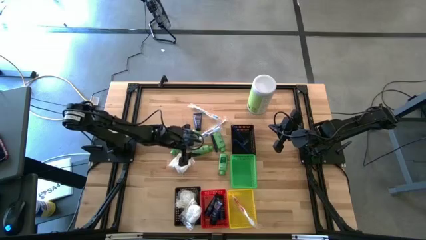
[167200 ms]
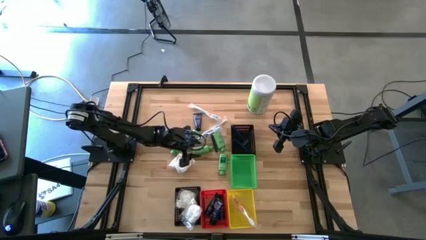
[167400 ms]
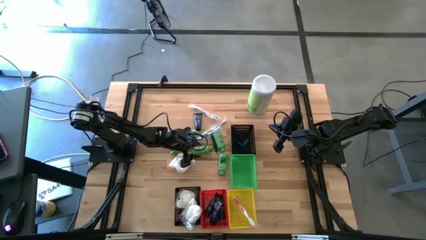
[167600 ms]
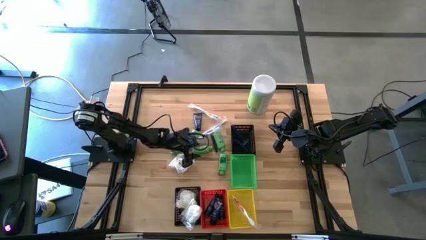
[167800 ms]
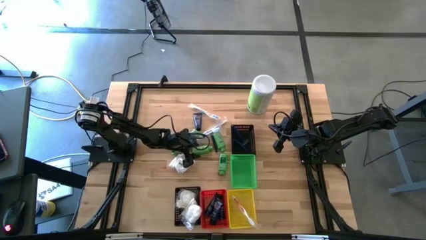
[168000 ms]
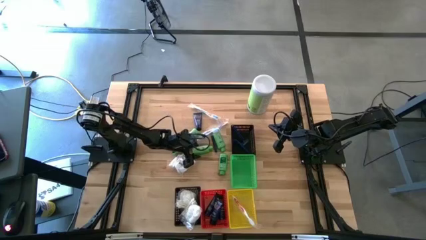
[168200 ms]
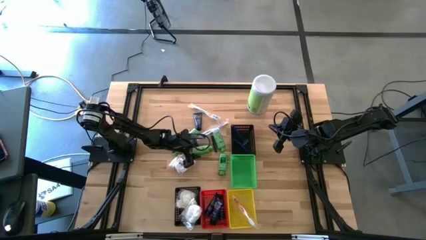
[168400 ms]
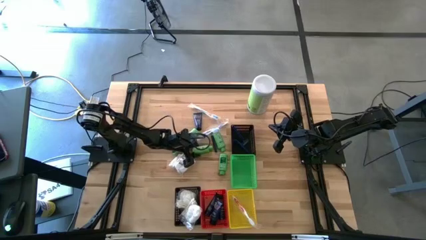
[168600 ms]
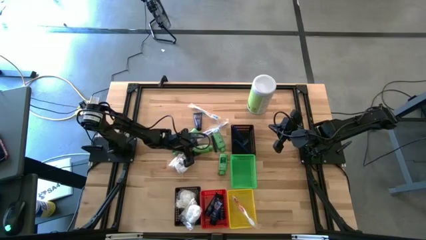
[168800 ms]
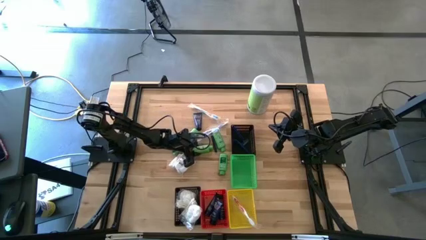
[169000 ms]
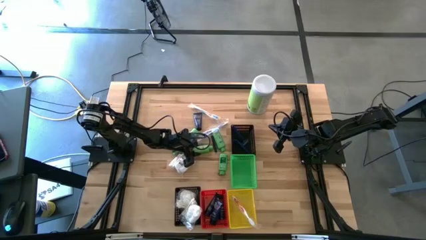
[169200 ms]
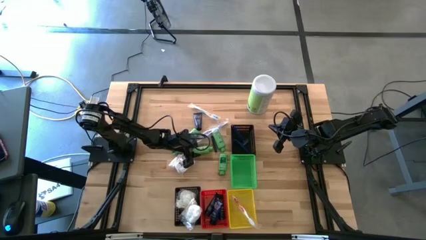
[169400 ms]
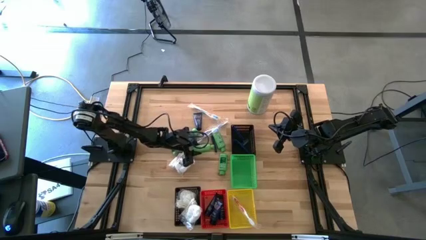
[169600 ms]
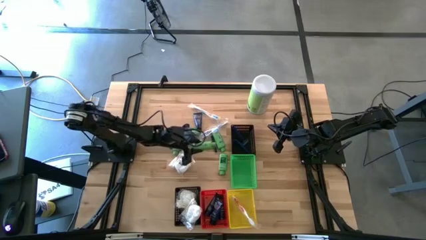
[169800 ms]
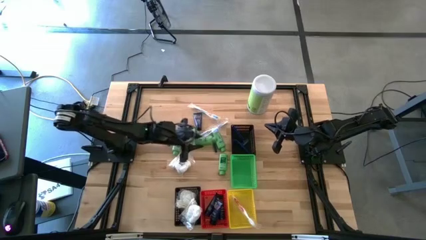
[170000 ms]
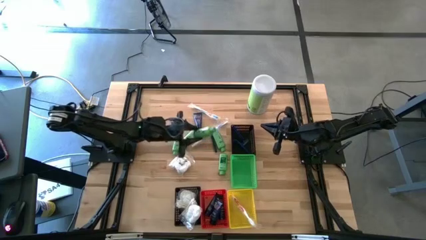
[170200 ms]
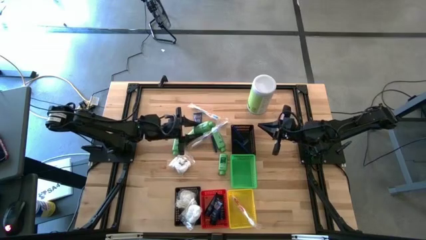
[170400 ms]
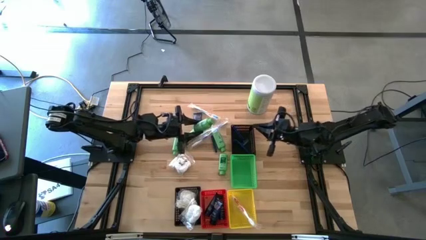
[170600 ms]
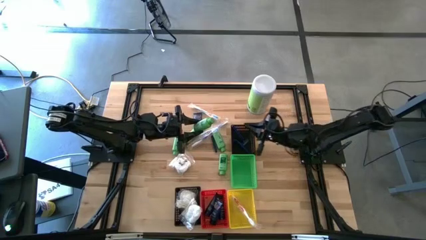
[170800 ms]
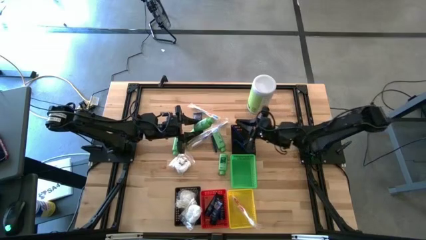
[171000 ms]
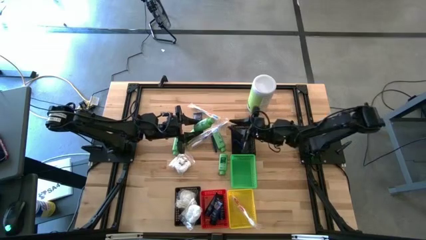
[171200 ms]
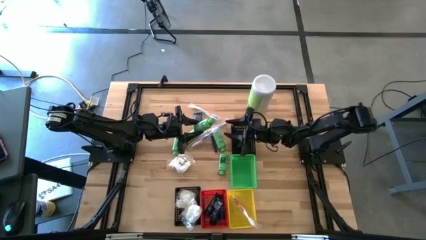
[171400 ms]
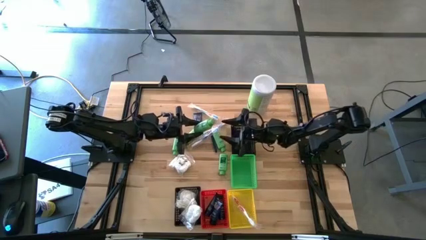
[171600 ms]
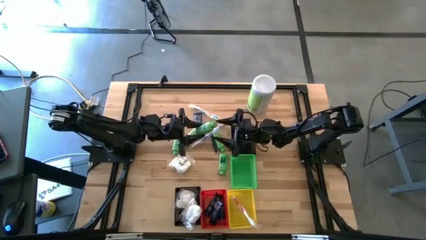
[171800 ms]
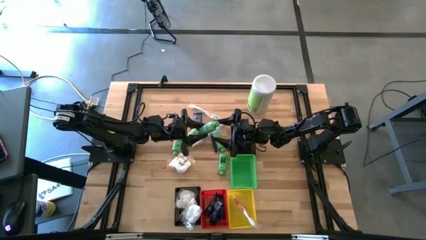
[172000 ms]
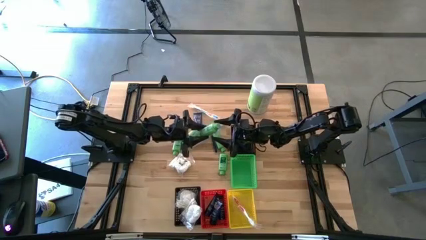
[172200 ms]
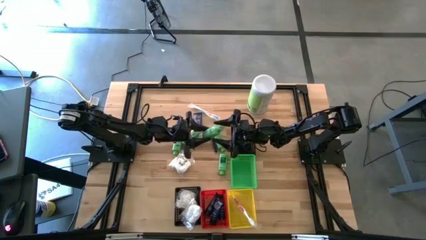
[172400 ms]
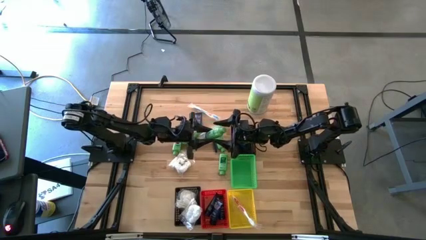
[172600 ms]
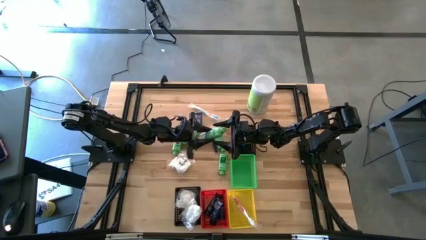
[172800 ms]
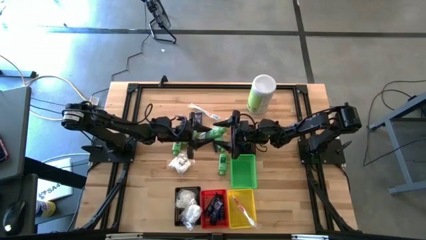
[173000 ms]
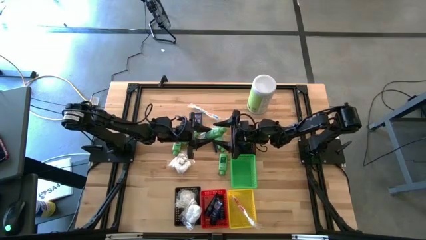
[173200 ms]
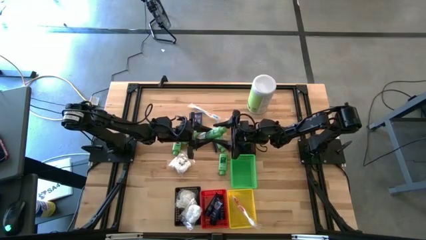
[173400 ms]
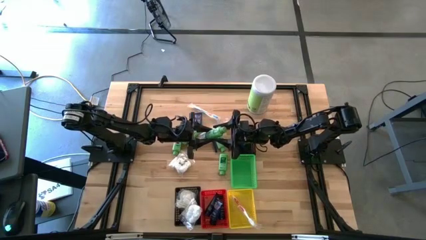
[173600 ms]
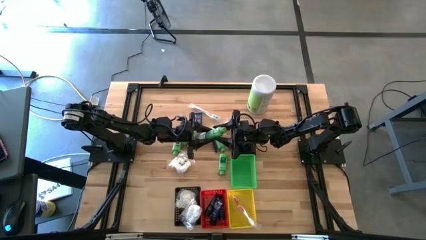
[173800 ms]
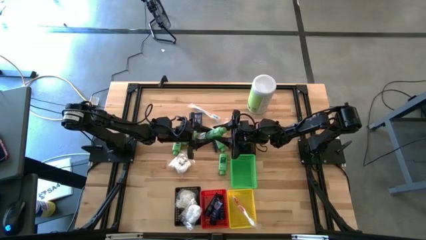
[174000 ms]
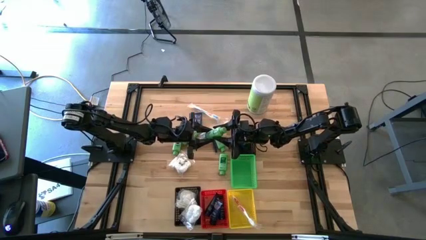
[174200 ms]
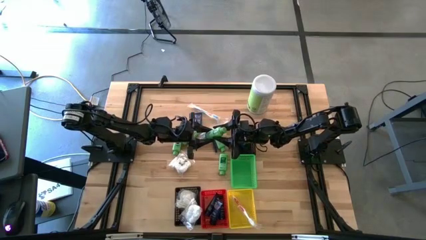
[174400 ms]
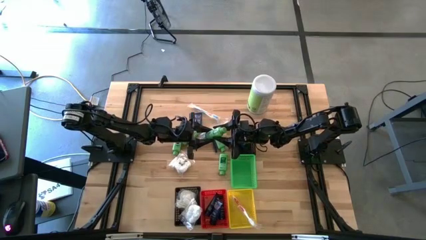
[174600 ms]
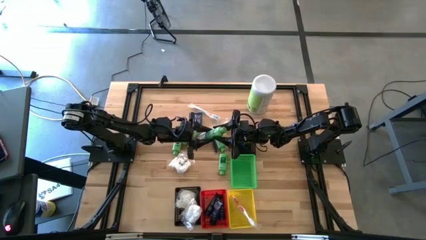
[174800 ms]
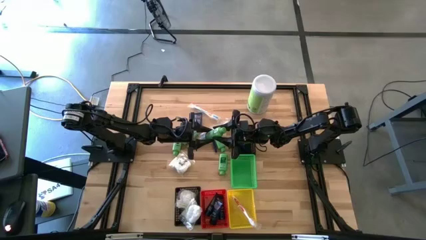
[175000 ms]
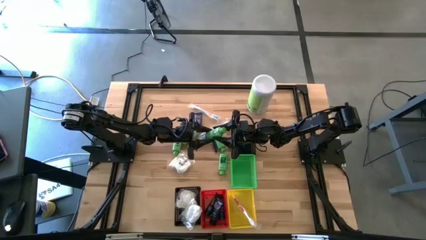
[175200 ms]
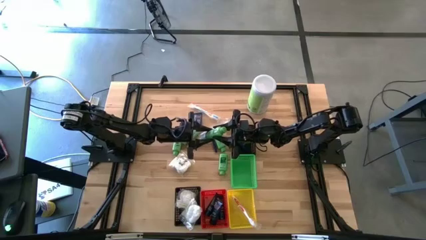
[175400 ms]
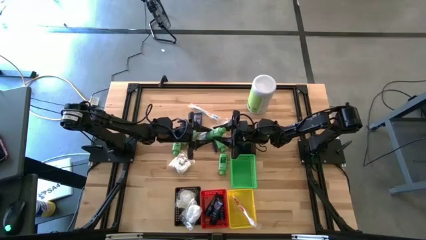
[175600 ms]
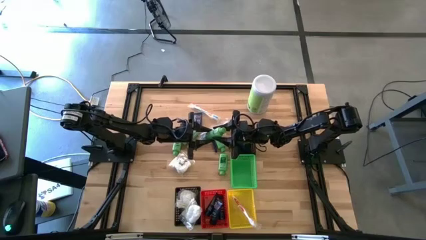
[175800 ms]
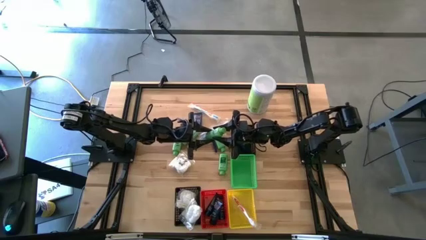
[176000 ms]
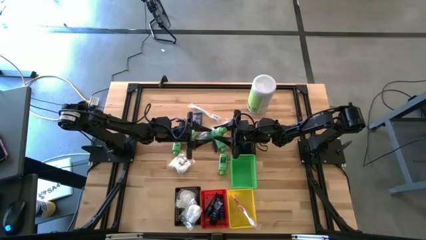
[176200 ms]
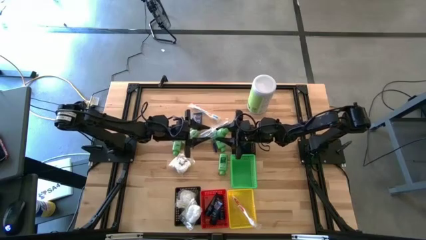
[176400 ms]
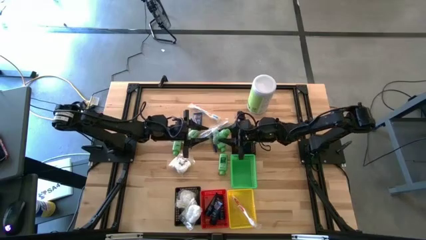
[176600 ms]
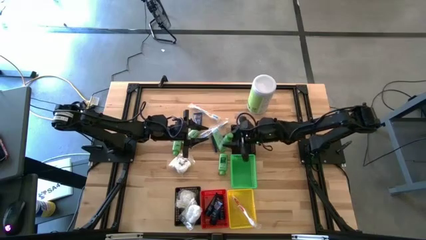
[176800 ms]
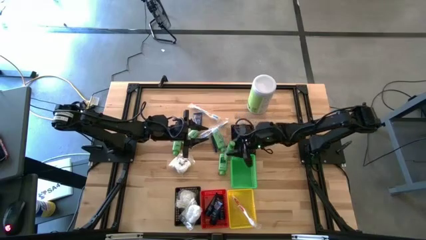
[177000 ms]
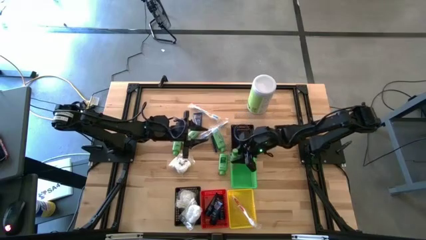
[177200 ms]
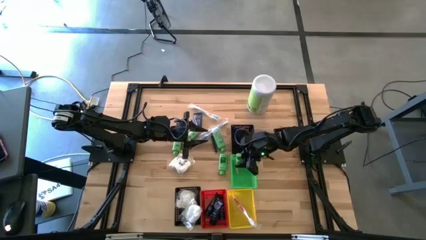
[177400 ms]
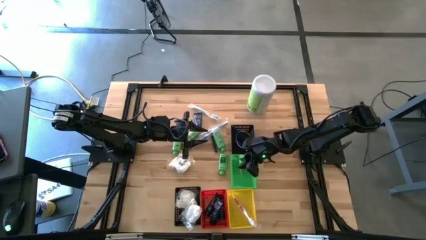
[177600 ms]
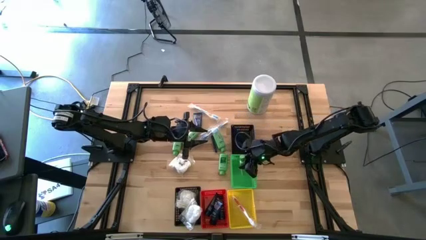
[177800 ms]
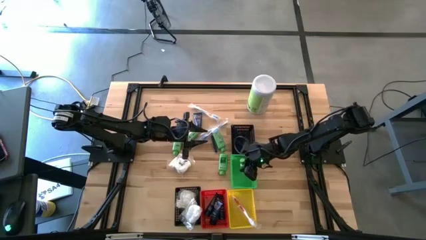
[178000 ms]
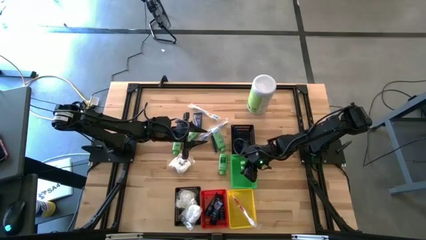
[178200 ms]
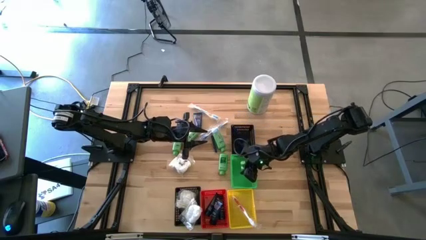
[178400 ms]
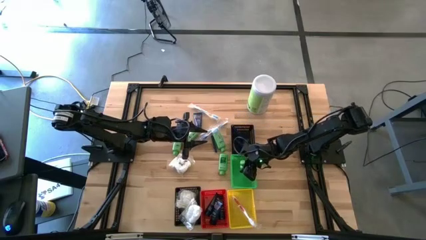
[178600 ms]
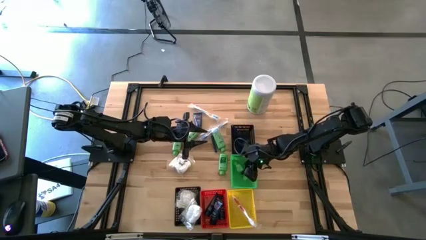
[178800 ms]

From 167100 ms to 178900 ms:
Task: Pick & Place Travel size toiletries
Put the green shampoo into the green bin

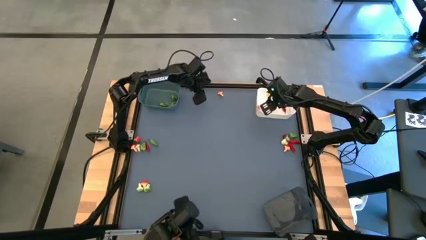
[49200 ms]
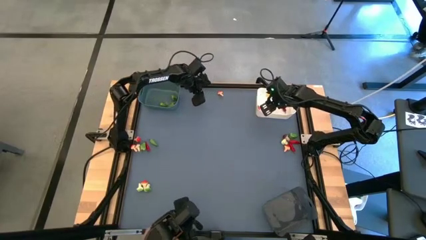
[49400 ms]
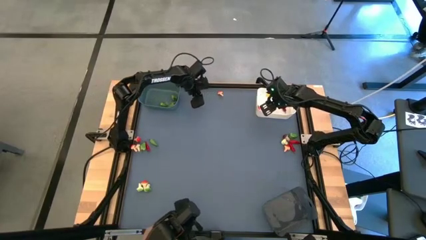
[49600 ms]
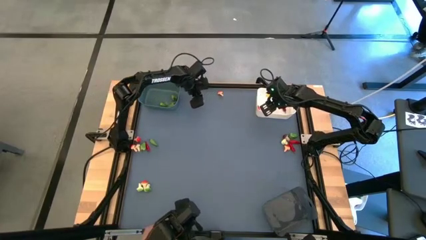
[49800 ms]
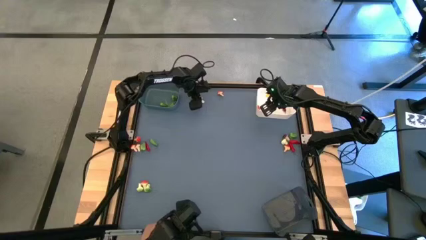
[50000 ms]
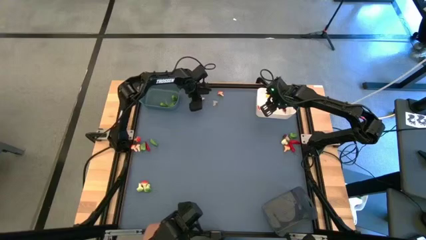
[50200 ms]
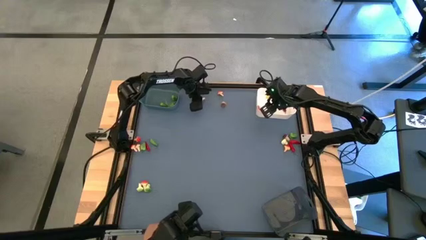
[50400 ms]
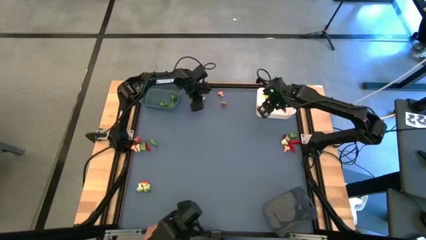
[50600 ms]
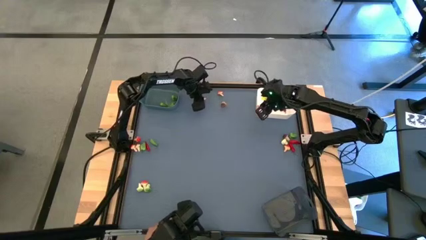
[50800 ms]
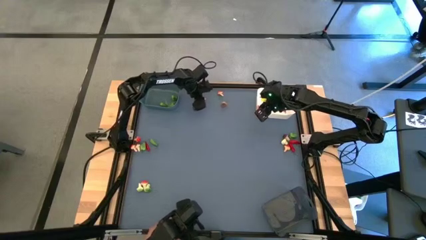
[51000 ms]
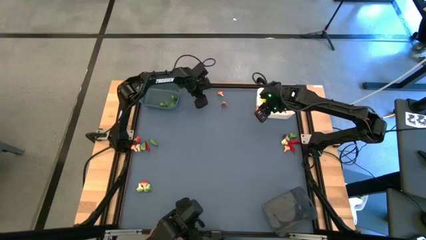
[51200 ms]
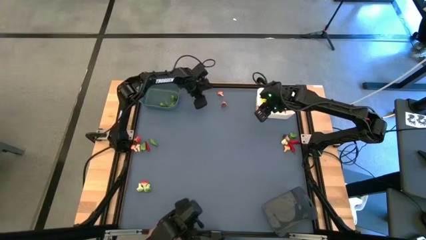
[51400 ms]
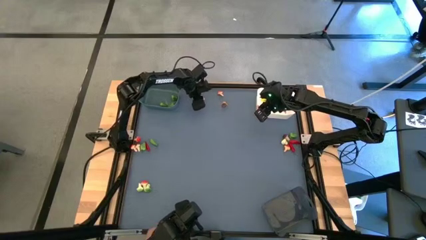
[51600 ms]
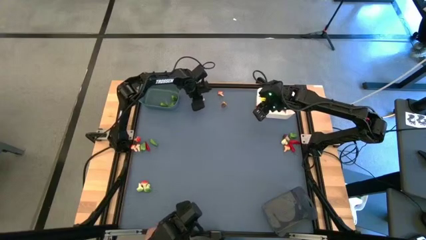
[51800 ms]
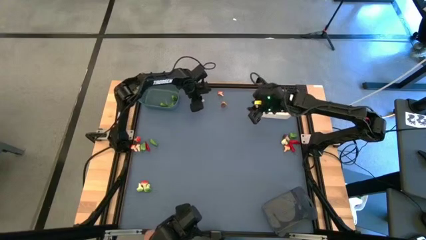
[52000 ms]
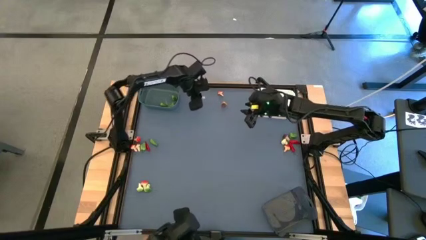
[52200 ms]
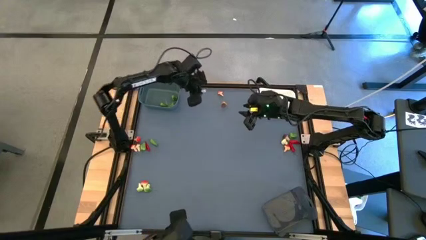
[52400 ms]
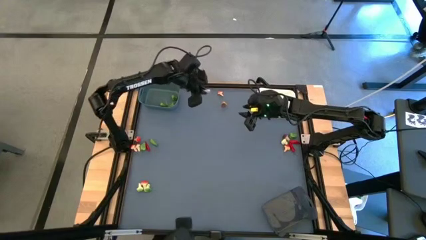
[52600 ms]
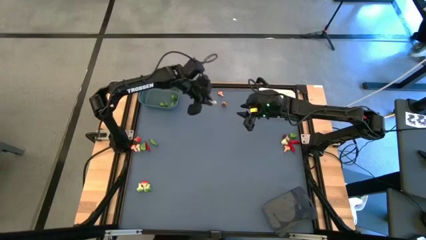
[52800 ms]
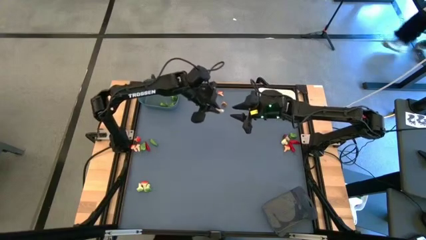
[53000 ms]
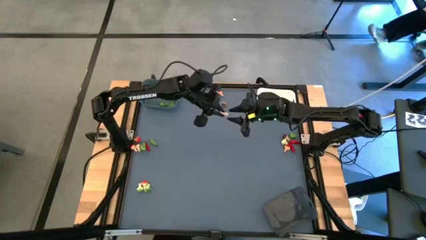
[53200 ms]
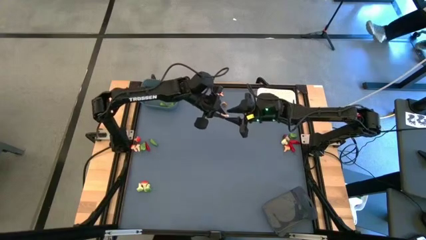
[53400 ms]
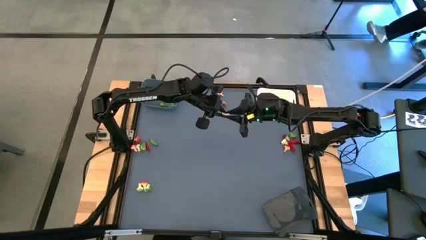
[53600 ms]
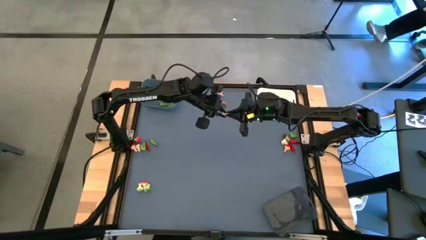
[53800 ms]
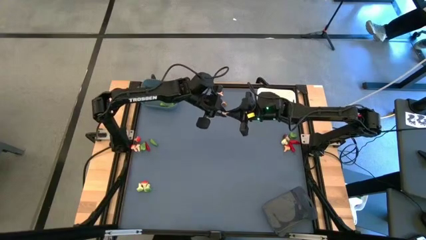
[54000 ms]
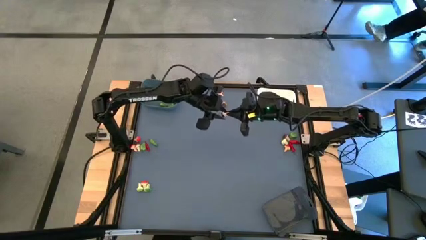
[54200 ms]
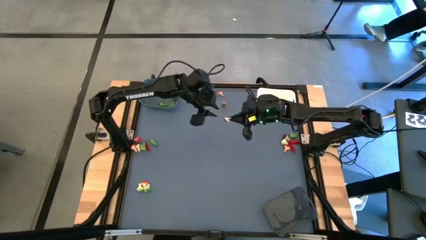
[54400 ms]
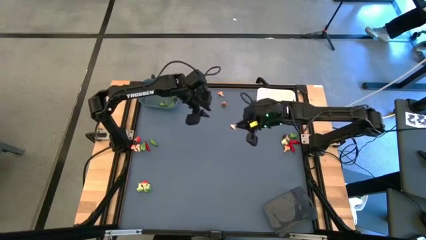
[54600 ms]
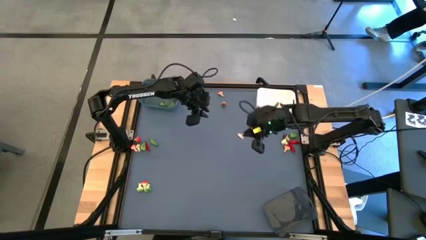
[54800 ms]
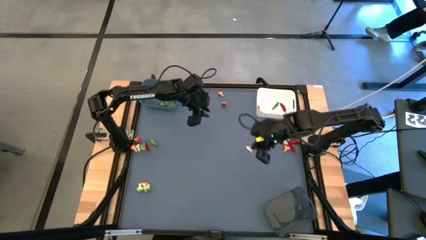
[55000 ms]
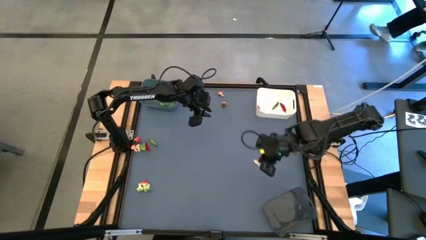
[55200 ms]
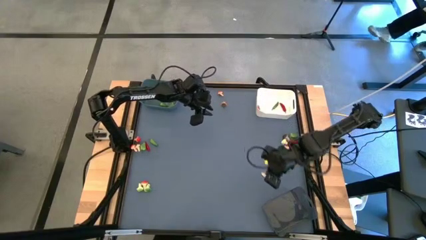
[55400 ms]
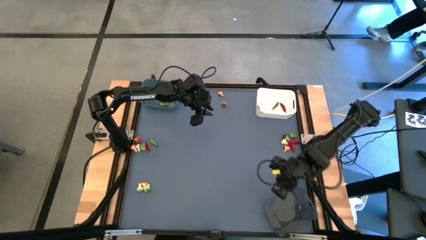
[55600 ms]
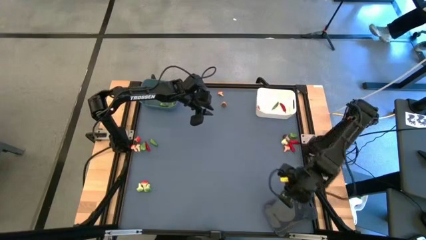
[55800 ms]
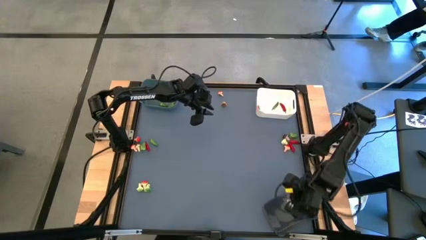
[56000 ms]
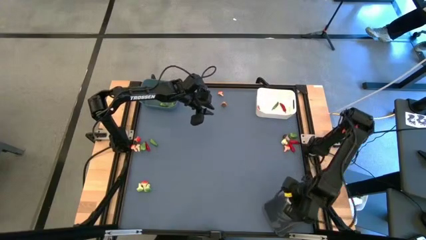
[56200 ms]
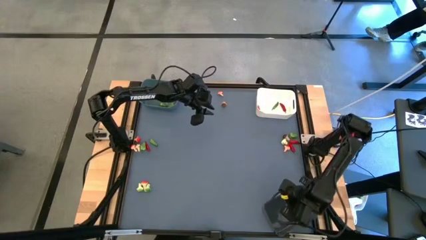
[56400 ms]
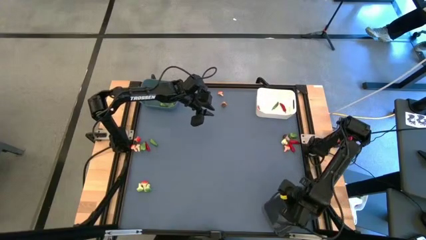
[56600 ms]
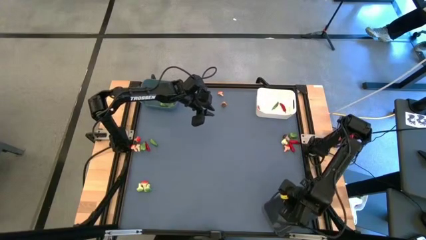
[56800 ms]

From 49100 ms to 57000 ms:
Task: Sort produce into baskets
Put the brown mushroom into the black bin
